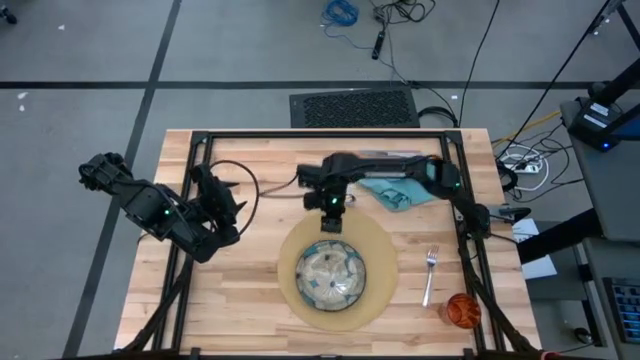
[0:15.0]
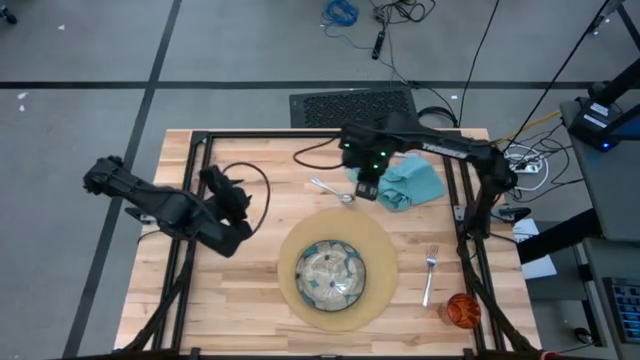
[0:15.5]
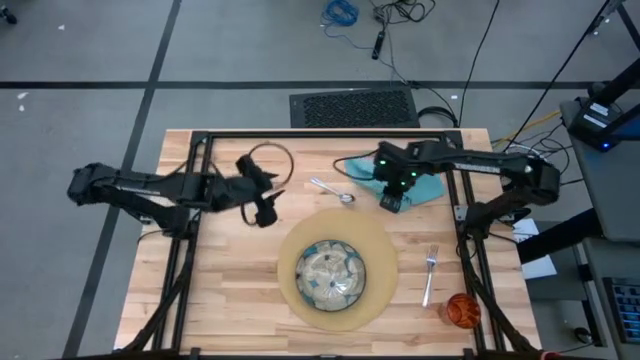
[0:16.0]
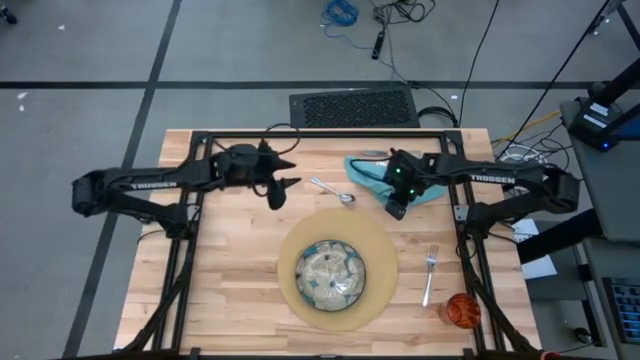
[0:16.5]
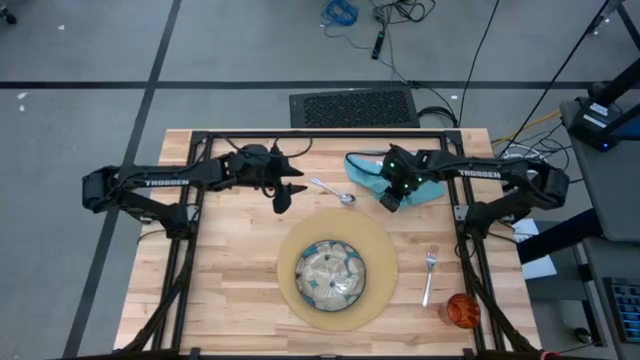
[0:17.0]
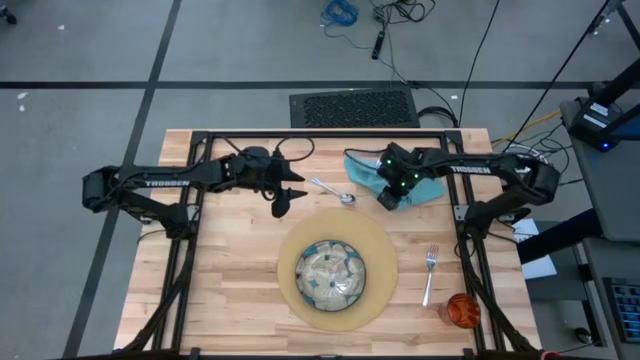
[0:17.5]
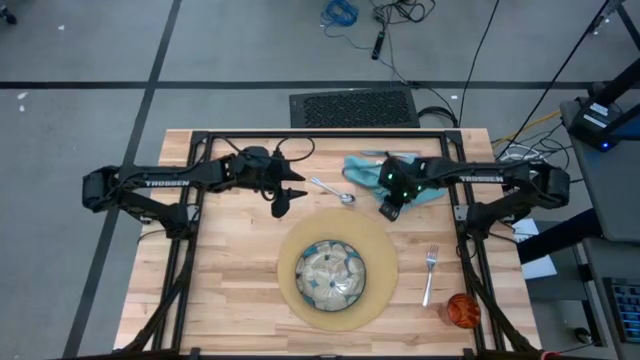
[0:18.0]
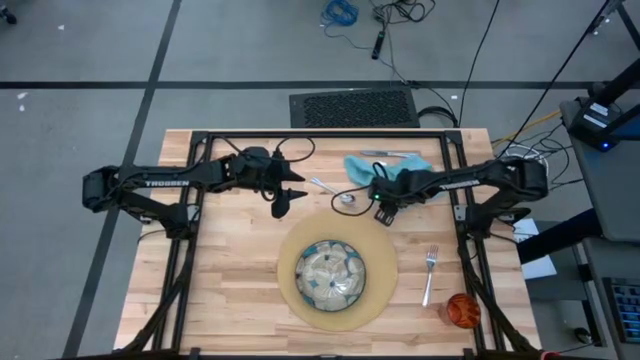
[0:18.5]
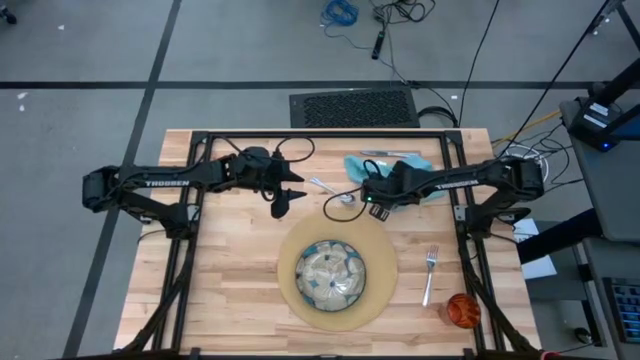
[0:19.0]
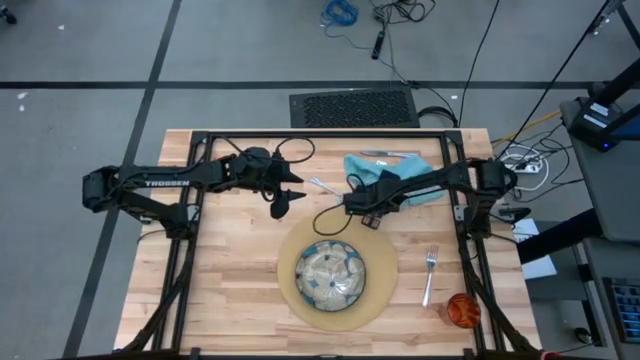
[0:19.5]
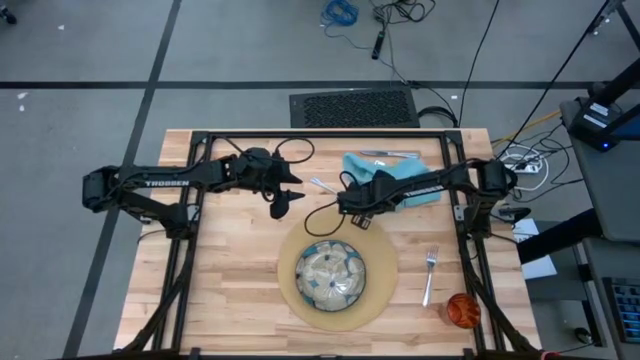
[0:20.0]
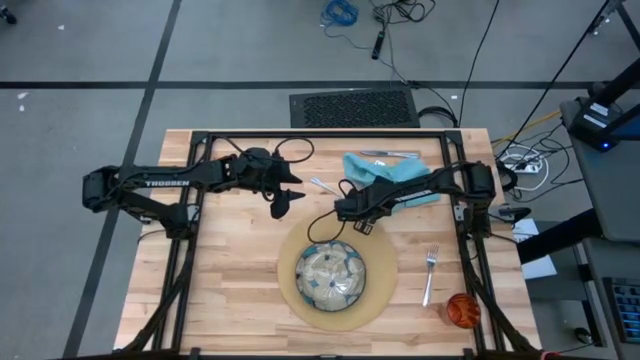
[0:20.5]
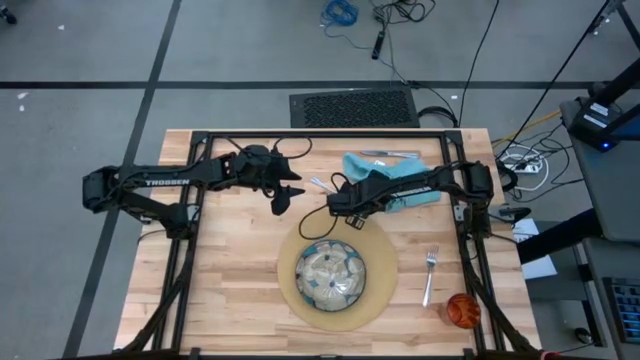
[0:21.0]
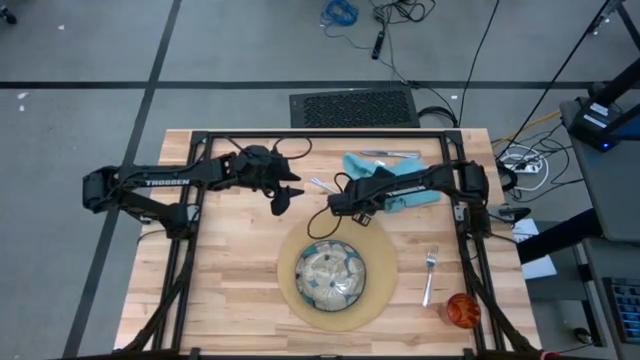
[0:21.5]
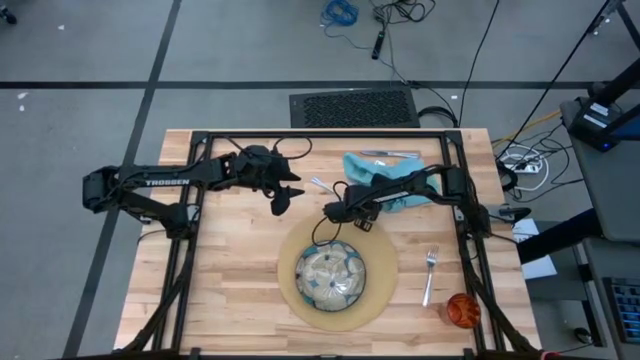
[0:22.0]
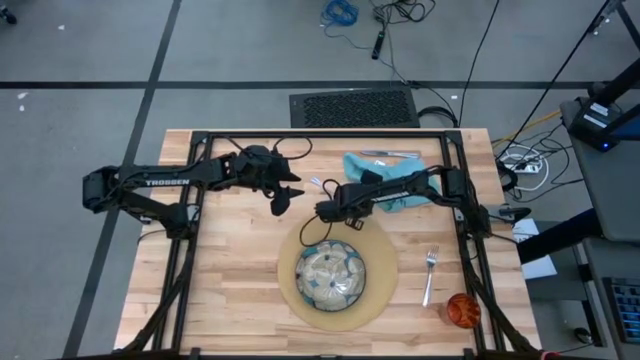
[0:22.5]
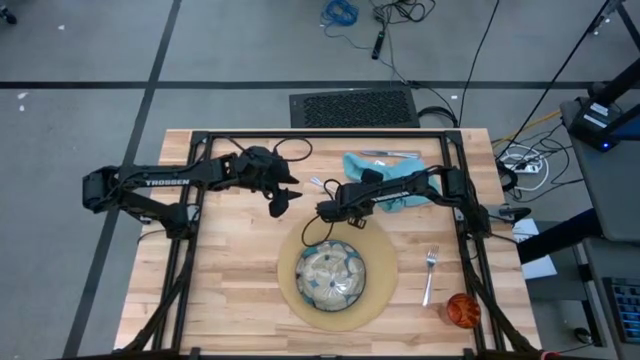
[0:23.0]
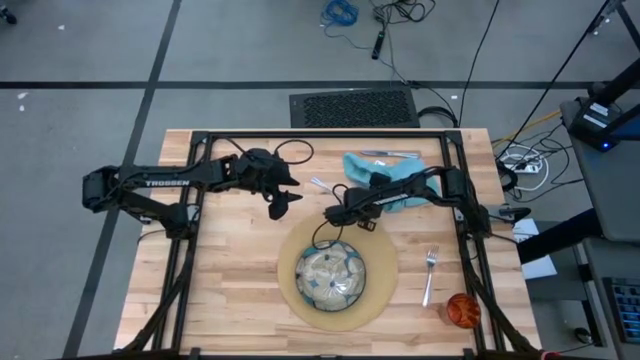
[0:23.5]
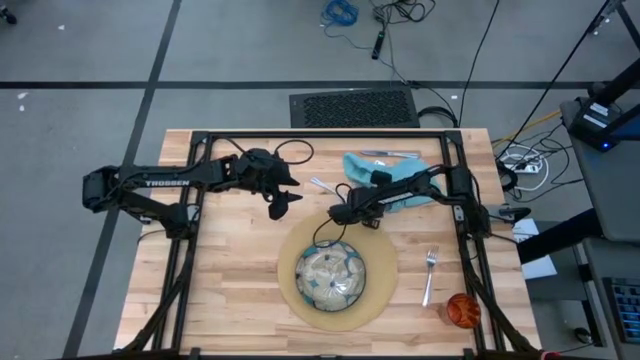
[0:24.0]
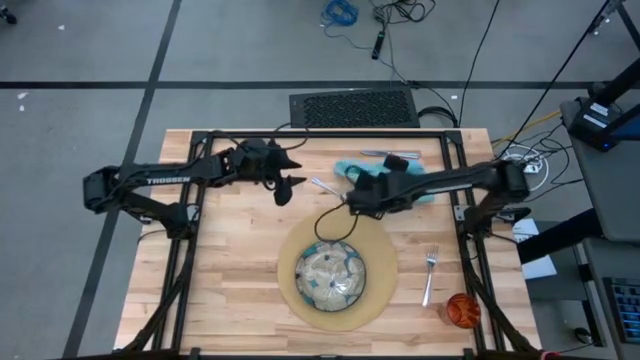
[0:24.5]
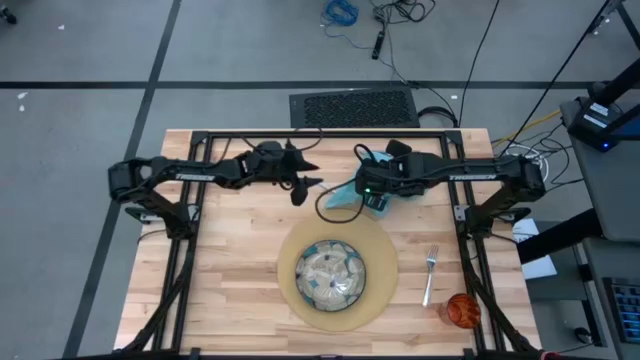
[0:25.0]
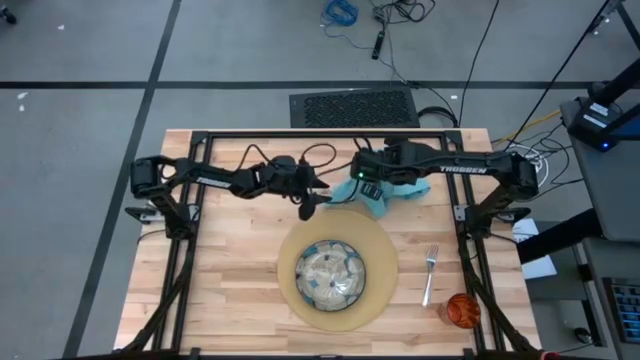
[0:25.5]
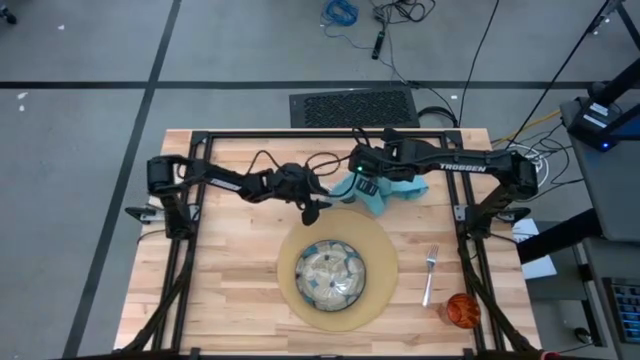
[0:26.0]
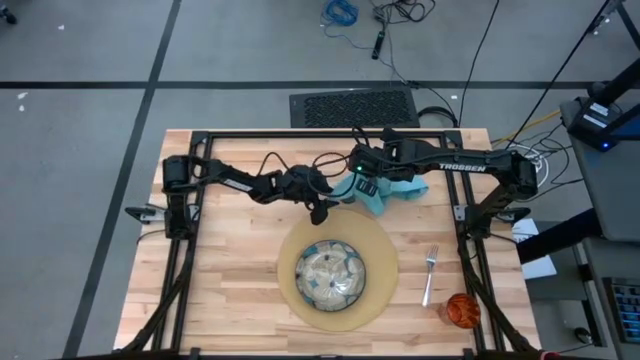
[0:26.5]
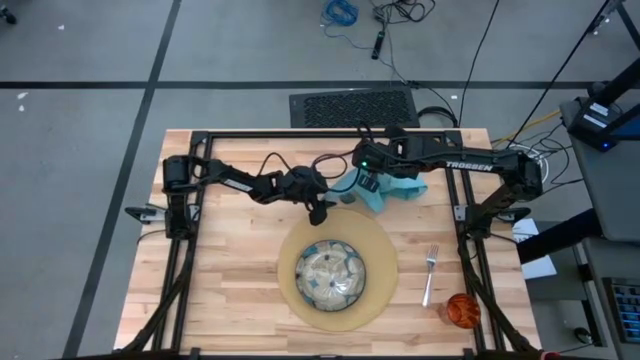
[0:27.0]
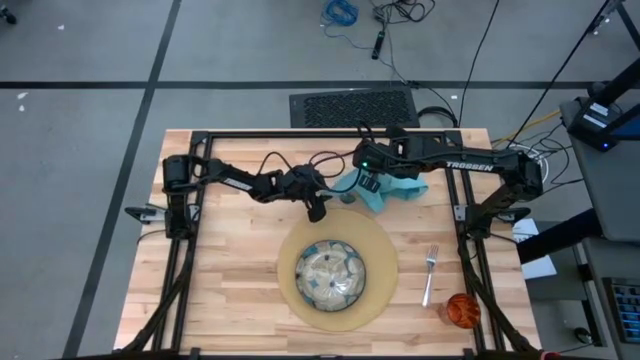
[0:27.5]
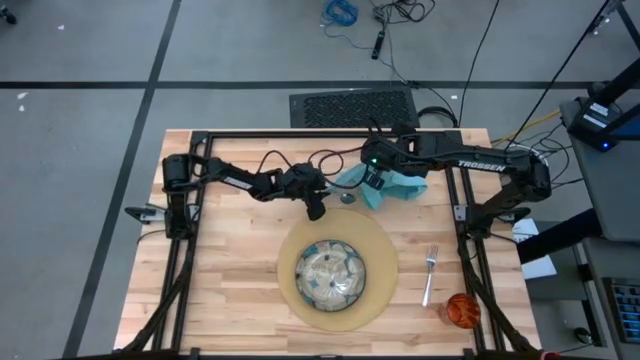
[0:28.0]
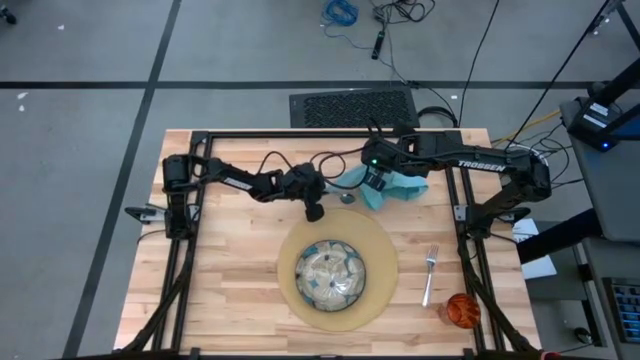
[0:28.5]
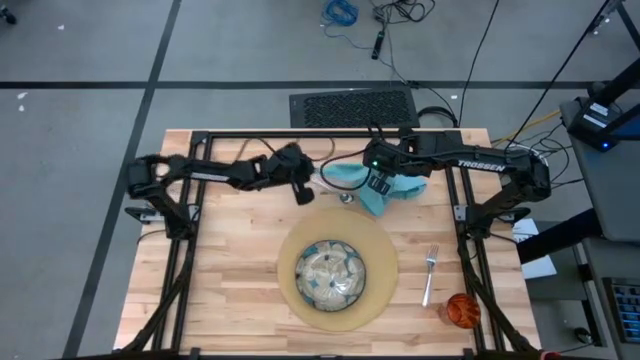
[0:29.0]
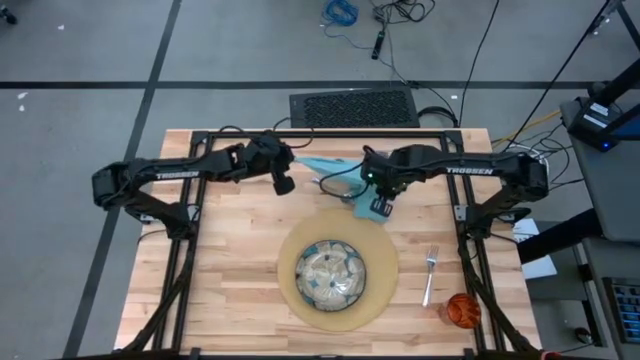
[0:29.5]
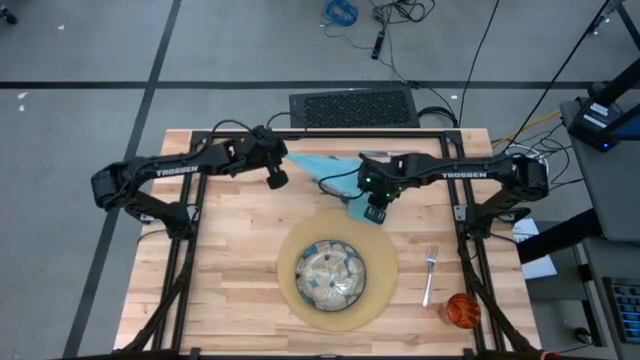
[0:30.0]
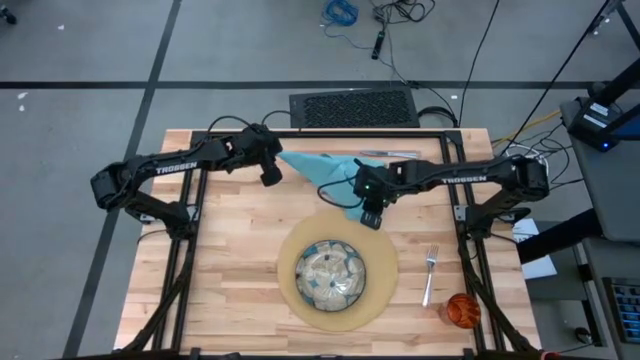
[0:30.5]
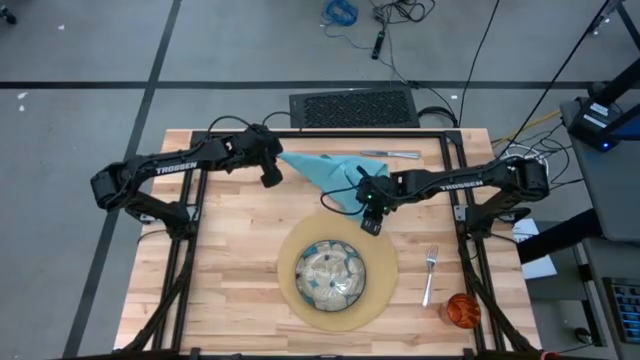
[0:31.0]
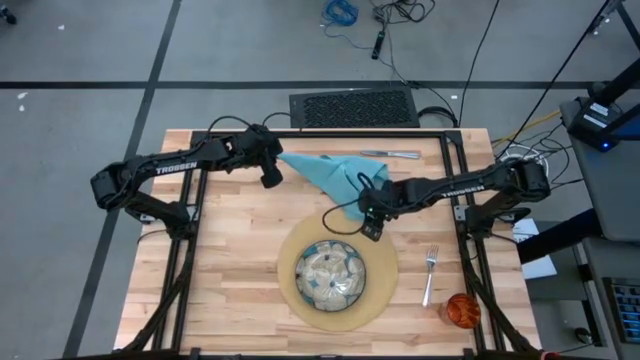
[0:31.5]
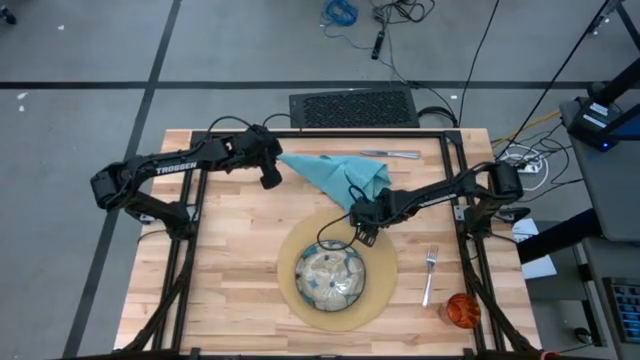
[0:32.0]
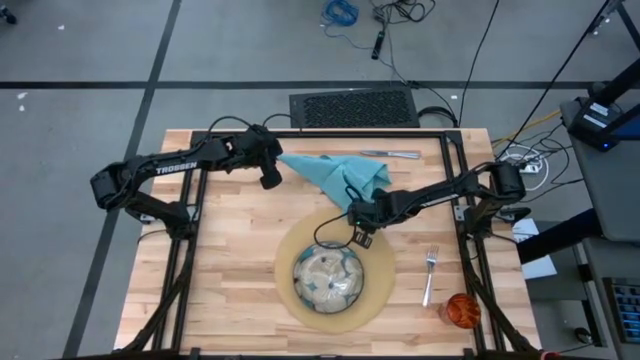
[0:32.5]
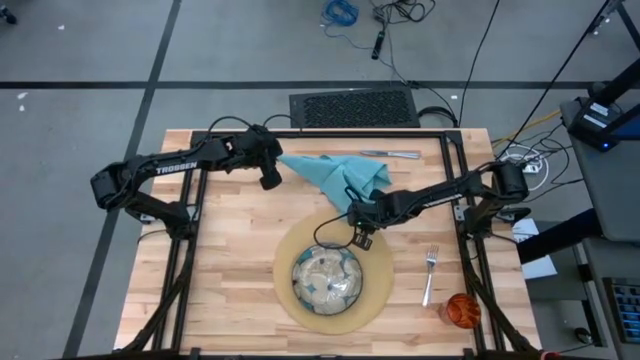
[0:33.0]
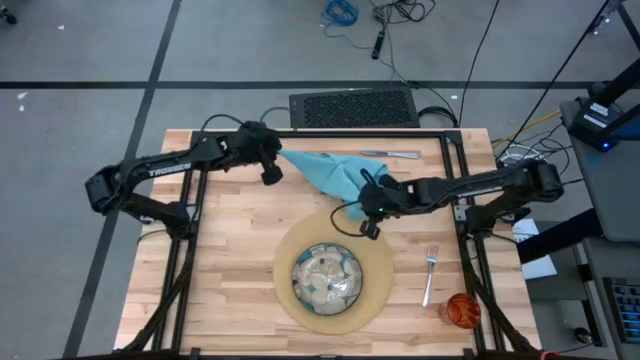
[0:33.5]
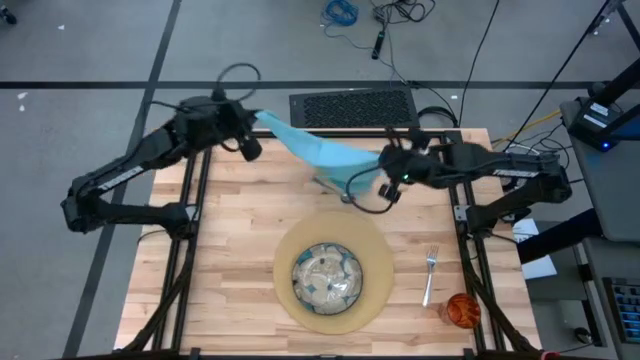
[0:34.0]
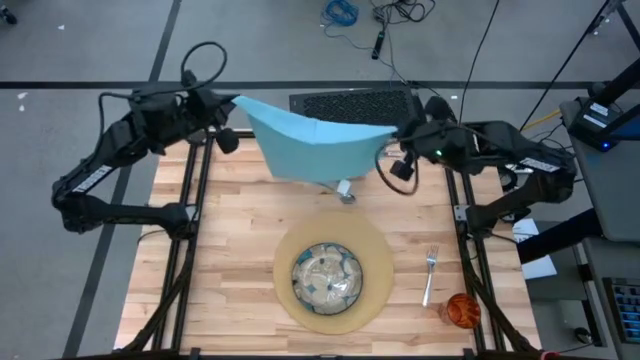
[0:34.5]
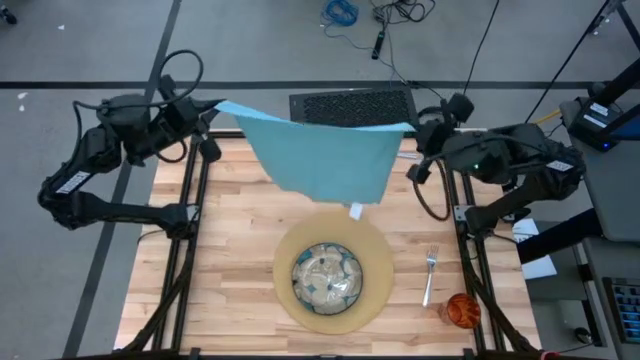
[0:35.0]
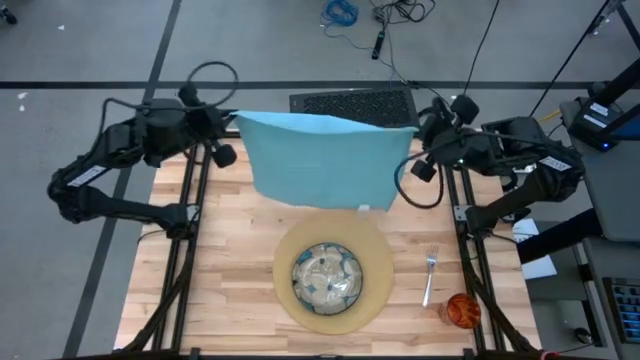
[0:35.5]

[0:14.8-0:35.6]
Task: Set table place
Fold the blue napkin
